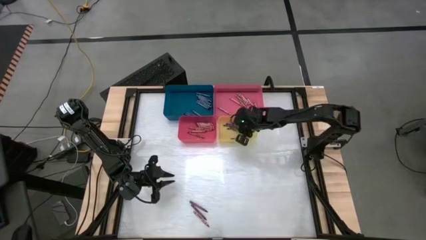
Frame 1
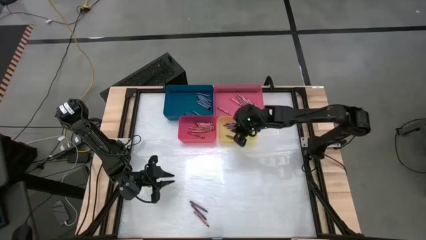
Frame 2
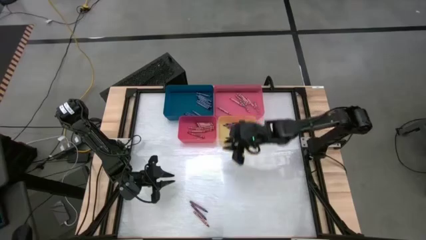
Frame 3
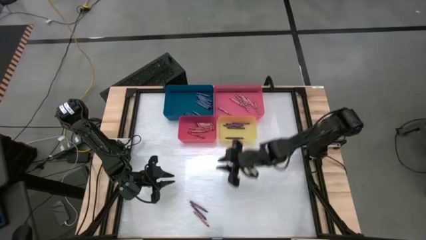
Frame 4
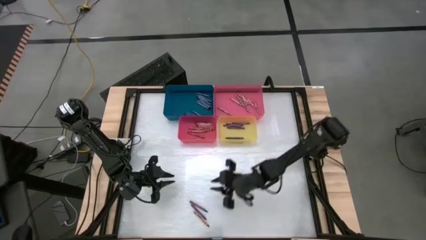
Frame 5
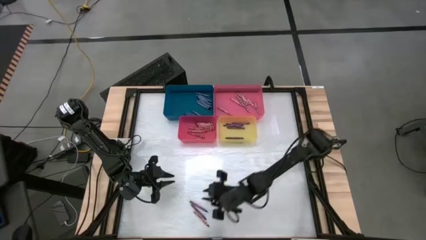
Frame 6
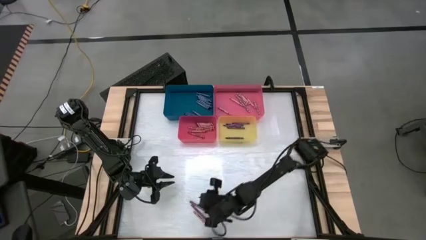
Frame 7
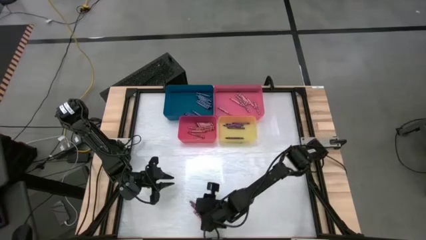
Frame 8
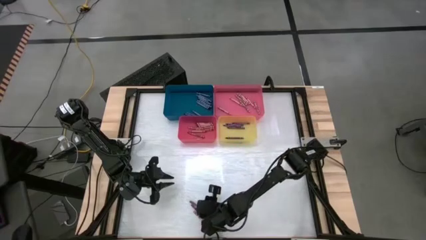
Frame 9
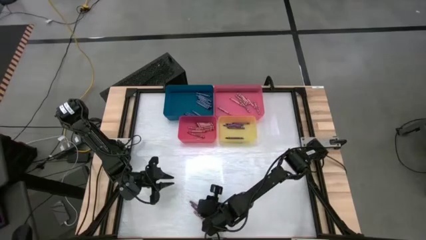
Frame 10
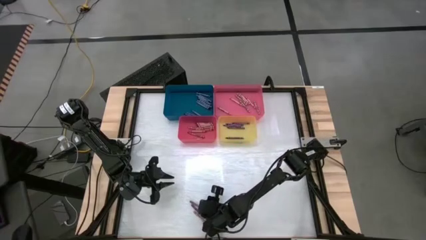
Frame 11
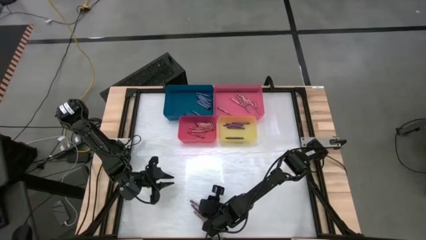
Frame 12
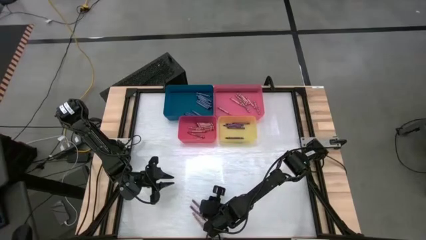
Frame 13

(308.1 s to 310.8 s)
Task: Sort crayons
Put the violet crayon into the yellow bin

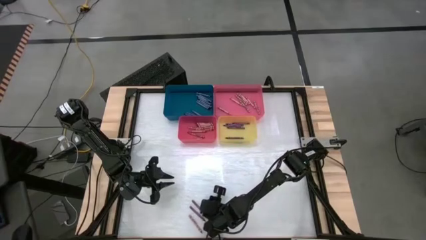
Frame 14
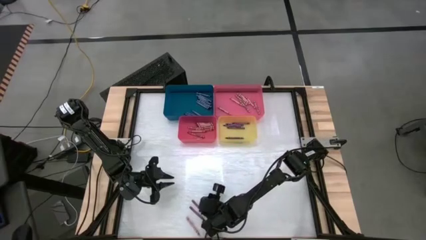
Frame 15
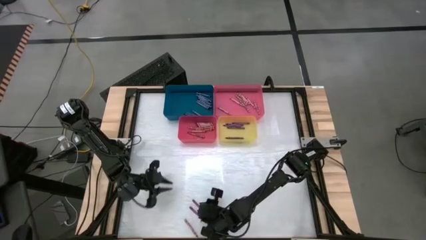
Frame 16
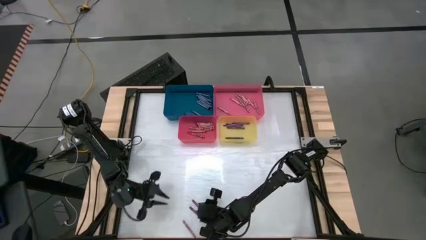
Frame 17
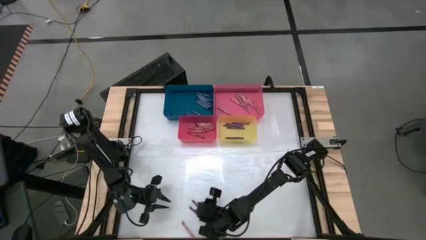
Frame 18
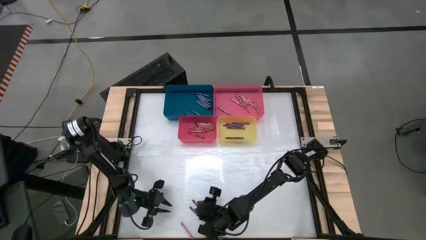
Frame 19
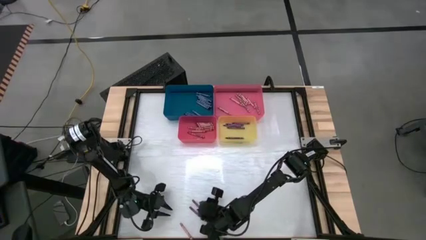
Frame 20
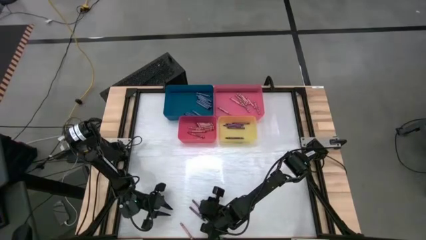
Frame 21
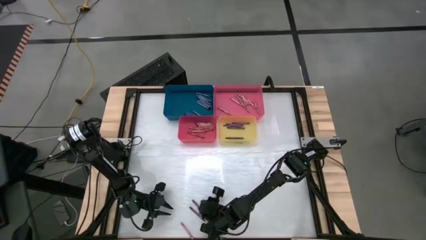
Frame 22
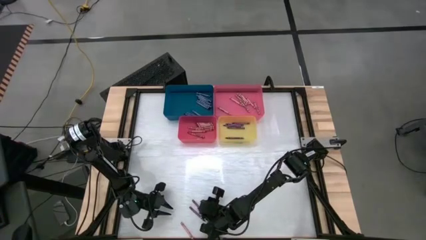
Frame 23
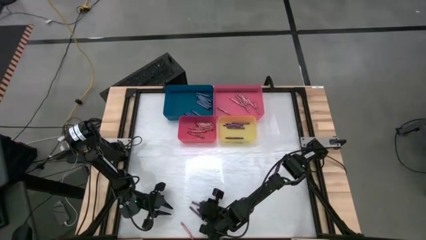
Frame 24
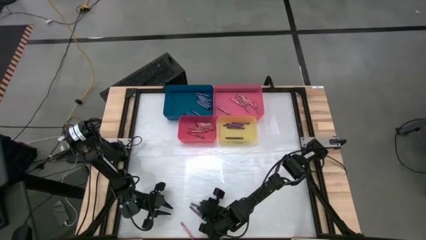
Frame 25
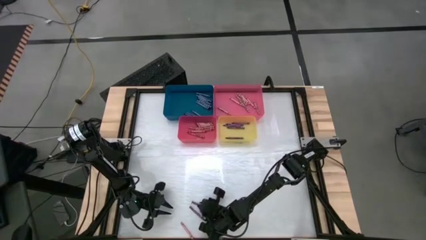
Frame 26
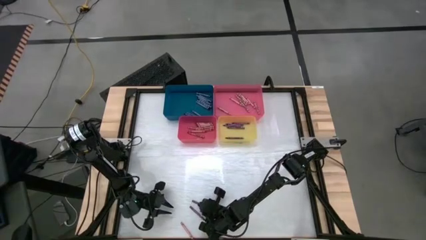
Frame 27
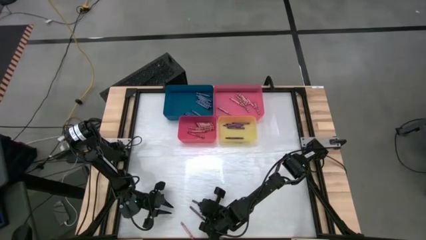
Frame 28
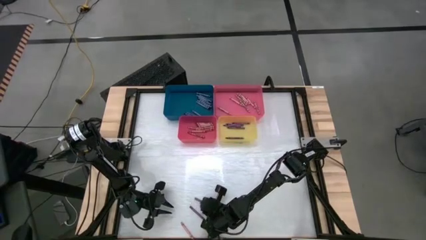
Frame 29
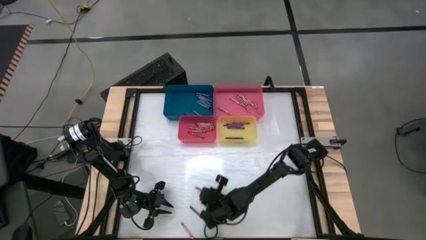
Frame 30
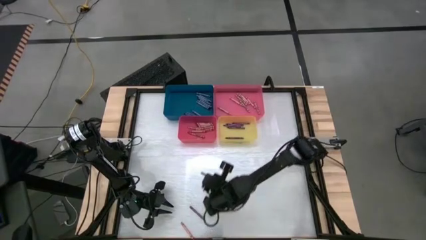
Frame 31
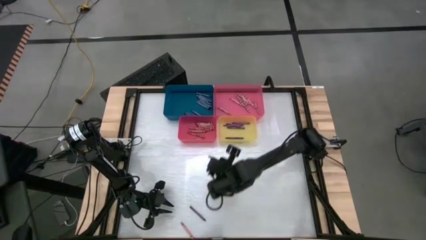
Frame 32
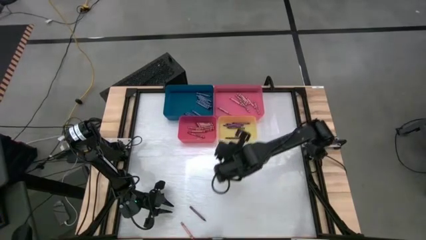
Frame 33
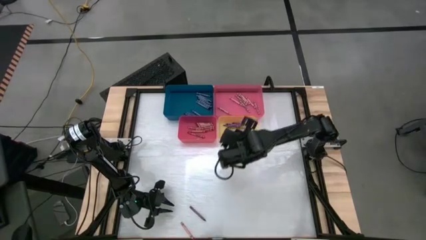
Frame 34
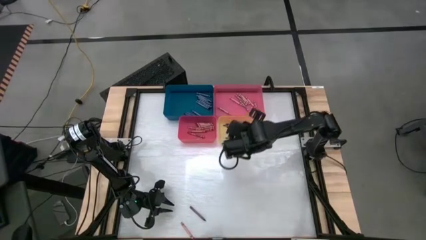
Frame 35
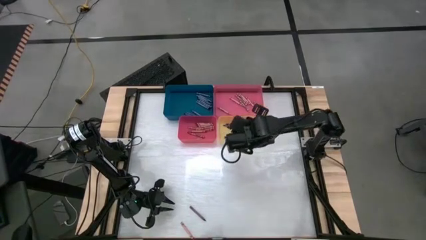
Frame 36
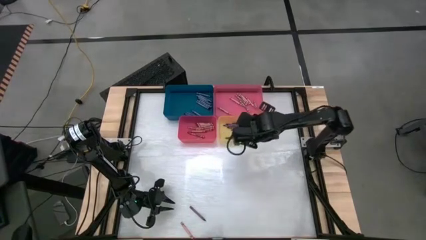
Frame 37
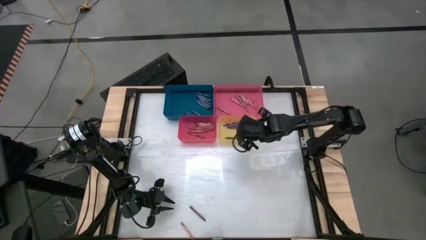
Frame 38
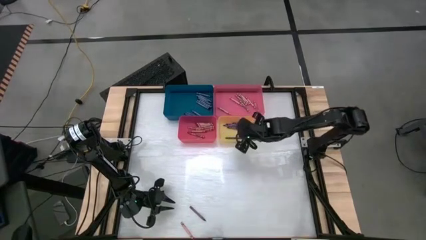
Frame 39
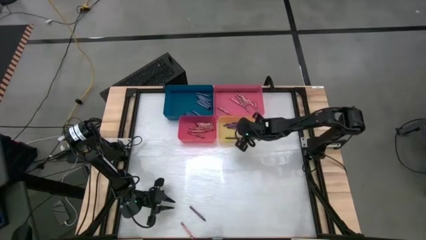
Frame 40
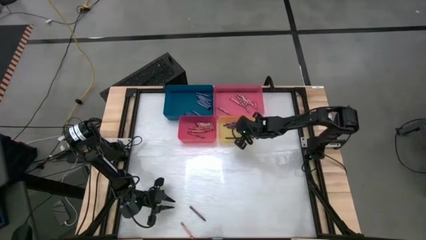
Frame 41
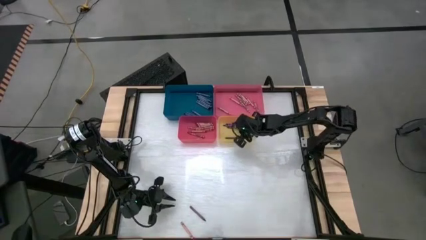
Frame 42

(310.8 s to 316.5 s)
Put the violet crayon into the yellow bin

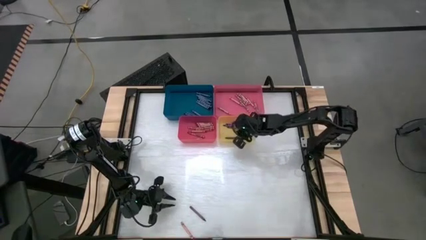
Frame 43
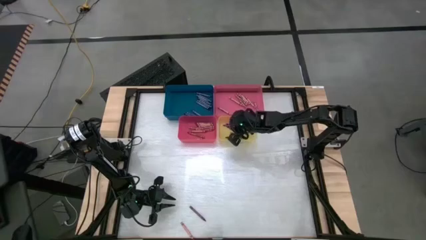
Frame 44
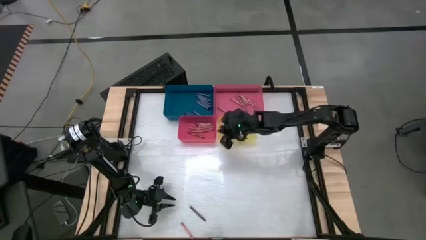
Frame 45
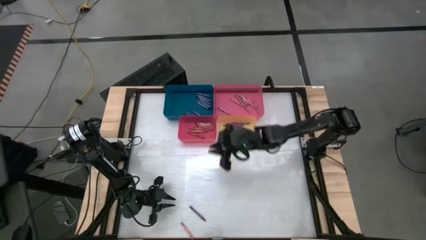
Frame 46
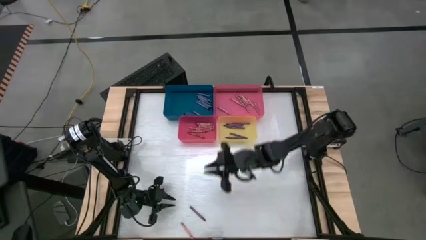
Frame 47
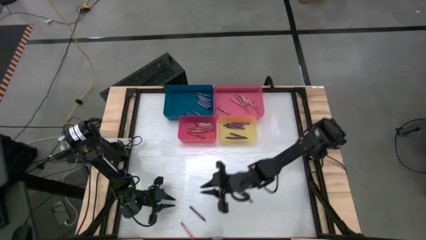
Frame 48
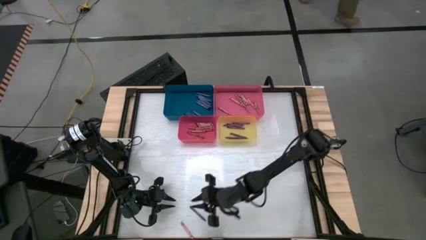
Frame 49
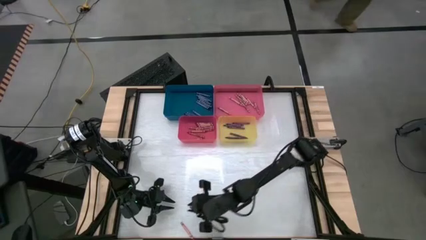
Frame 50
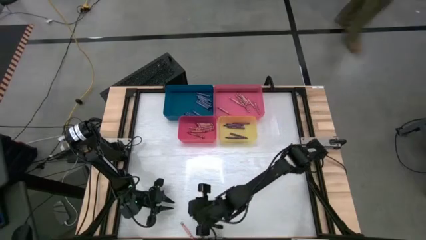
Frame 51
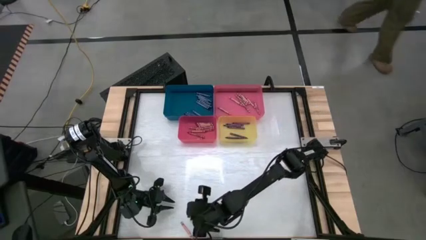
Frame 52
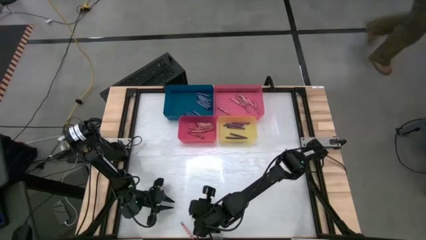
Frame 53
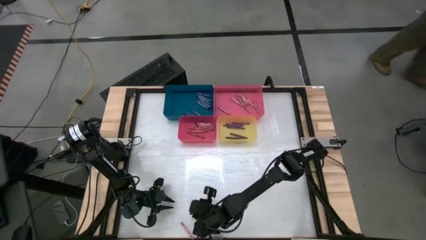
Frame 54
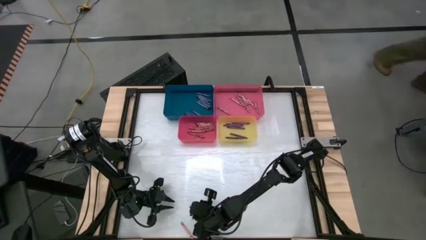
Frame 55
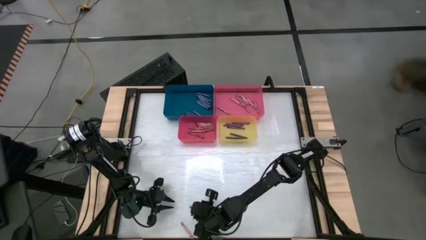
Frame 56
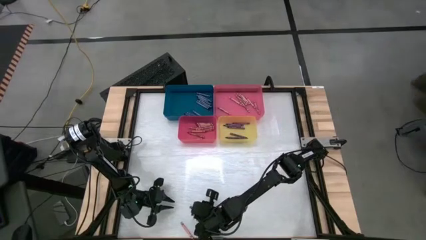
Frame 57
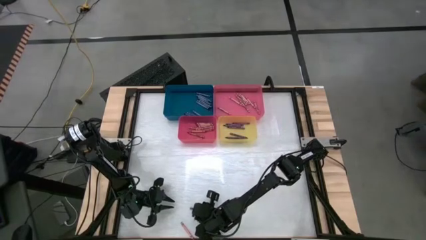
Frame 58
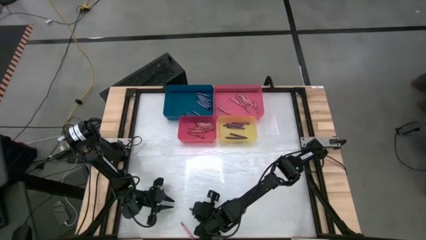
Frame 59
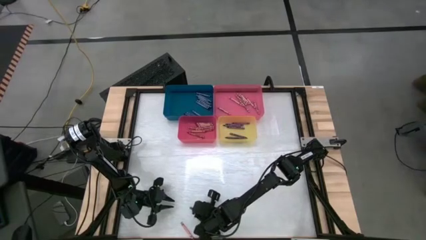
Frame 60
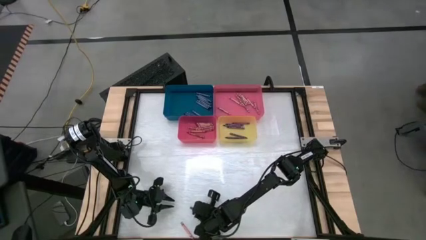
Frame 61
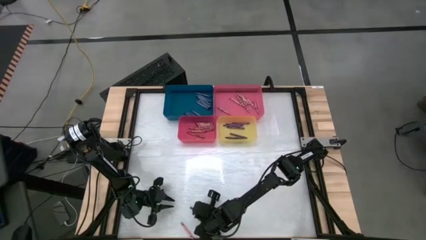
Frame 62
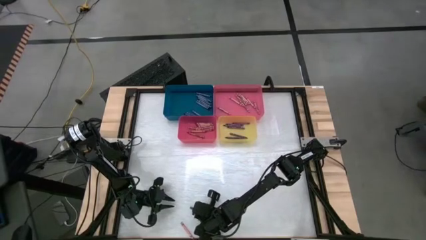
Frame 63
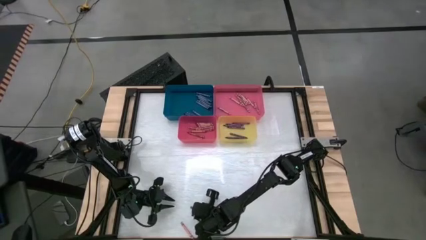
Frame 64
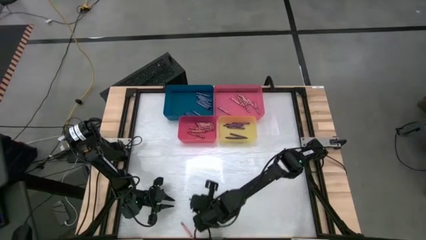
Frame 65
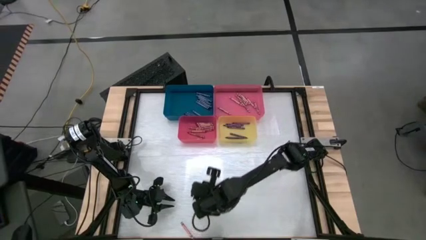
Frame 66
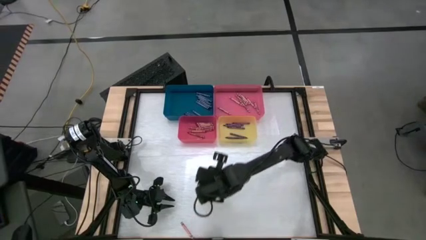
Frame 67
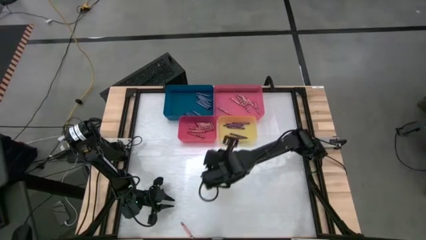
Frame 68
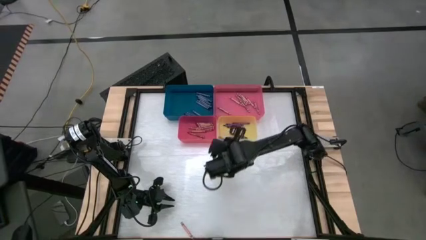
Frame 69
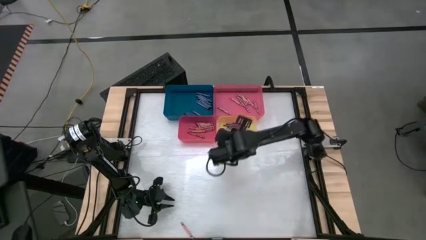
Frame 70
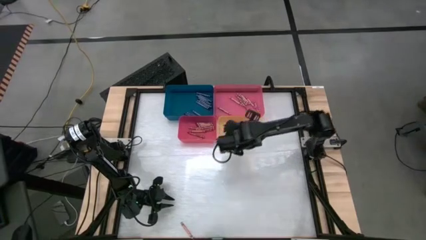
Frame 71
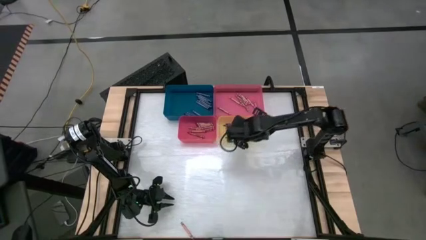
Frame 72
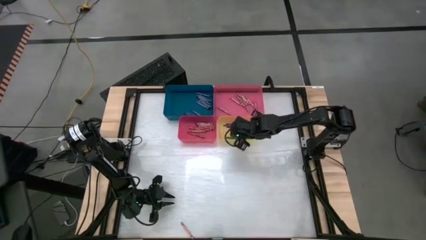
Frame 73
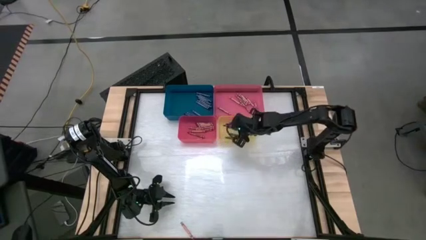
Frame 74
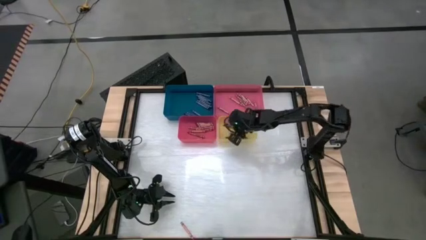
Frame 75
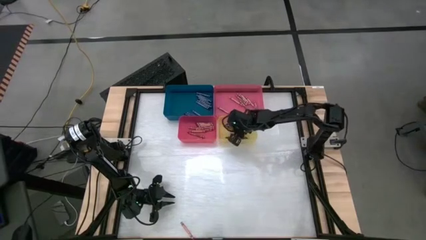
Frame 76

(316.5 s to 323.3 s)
Put the violet crayon into the yellow bin
